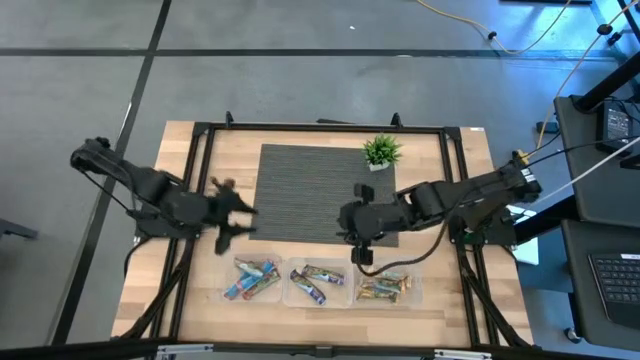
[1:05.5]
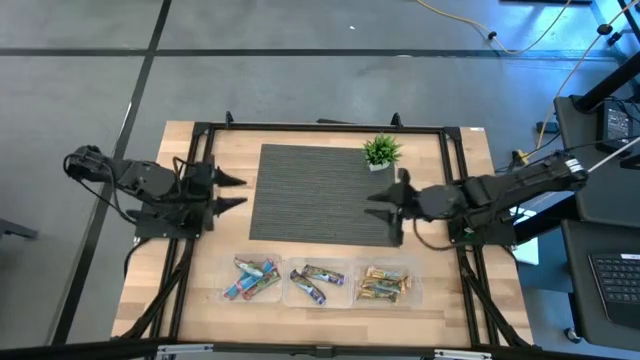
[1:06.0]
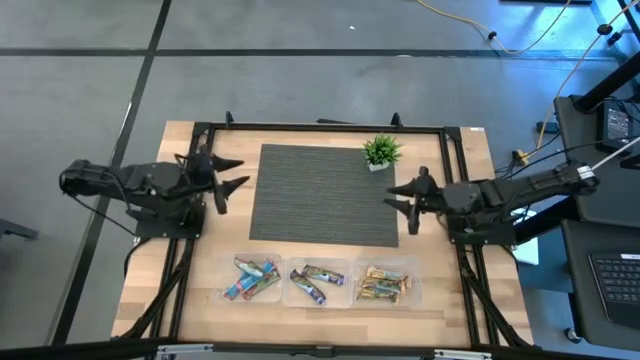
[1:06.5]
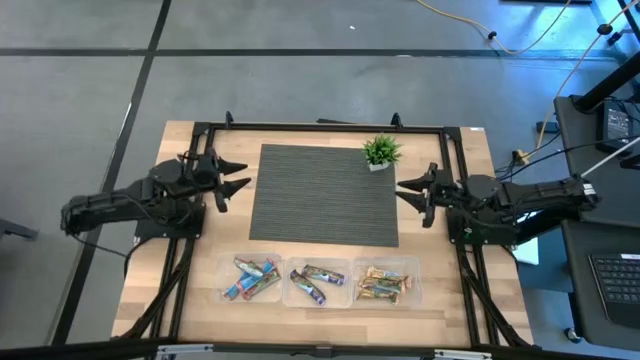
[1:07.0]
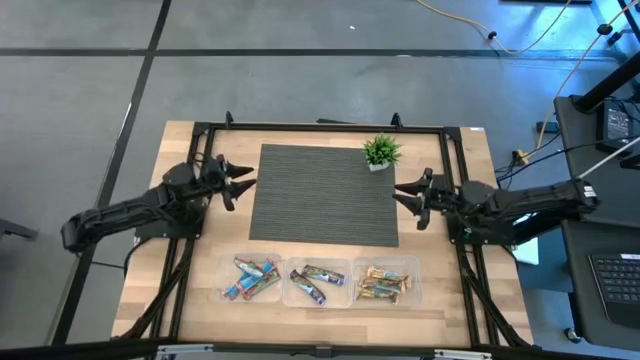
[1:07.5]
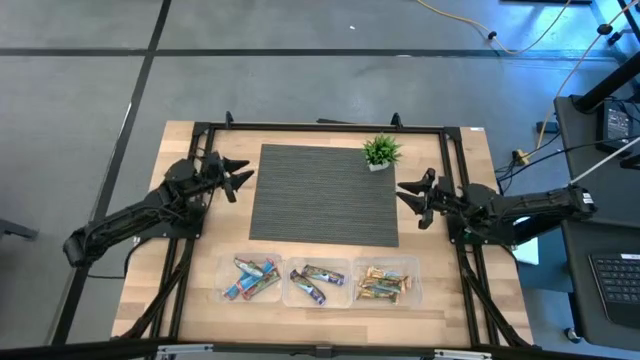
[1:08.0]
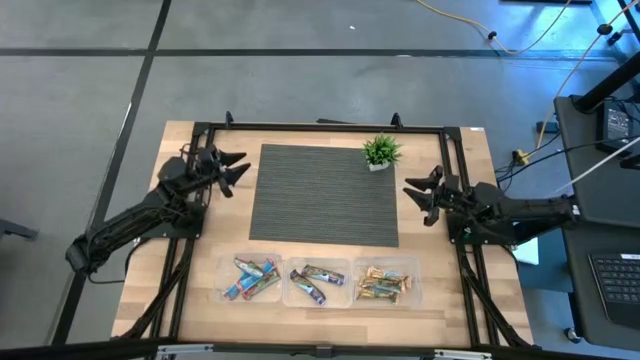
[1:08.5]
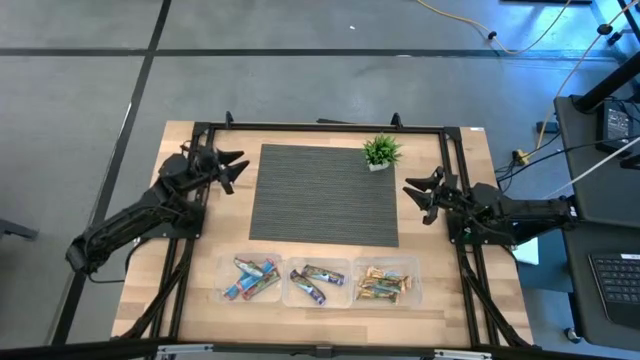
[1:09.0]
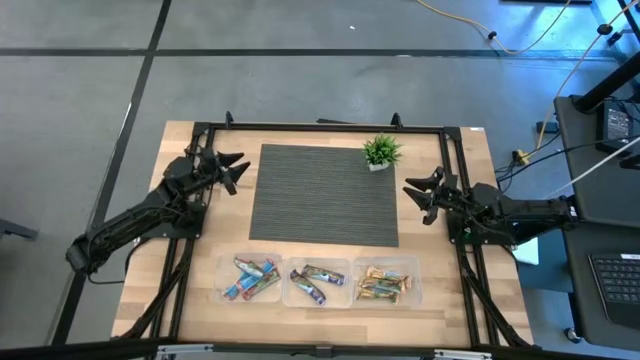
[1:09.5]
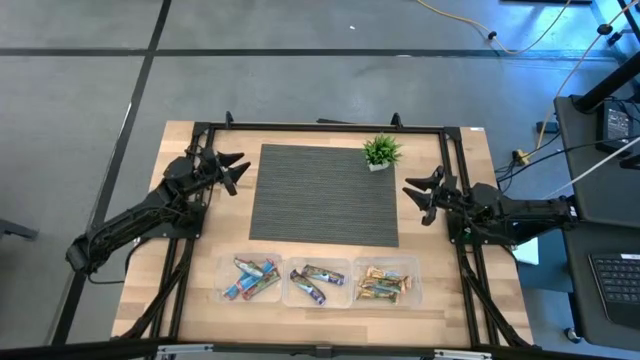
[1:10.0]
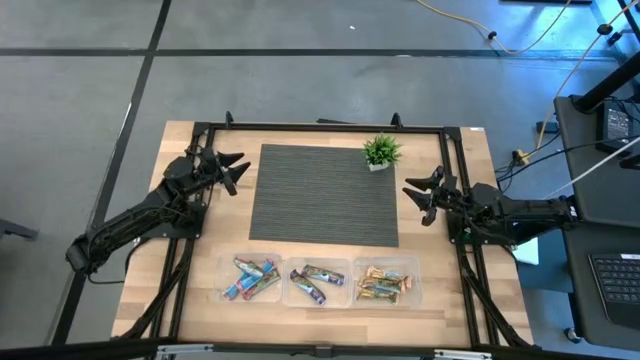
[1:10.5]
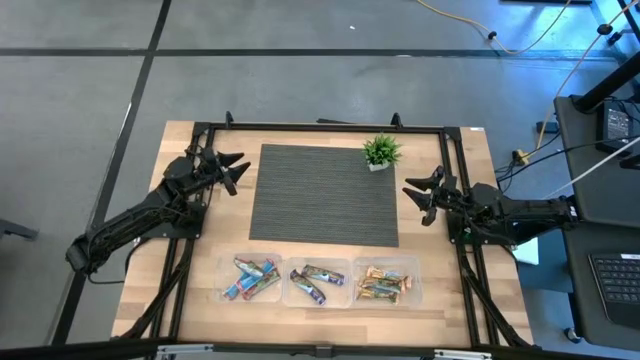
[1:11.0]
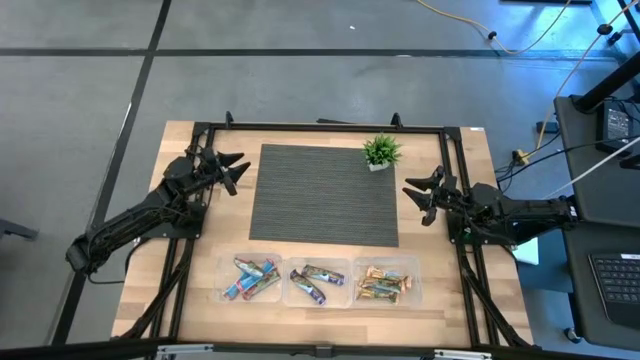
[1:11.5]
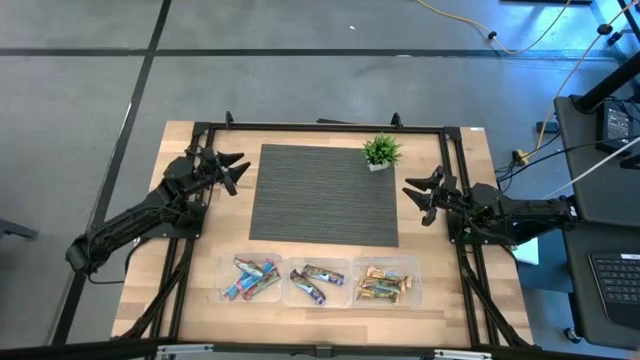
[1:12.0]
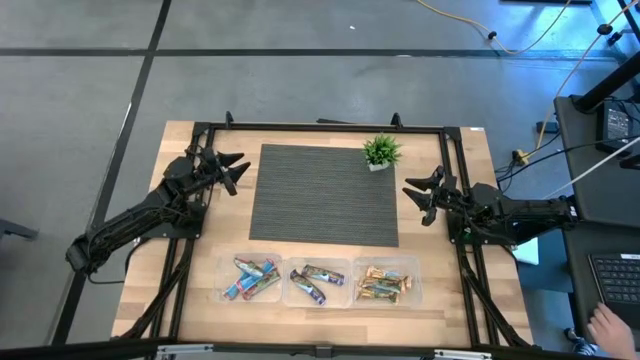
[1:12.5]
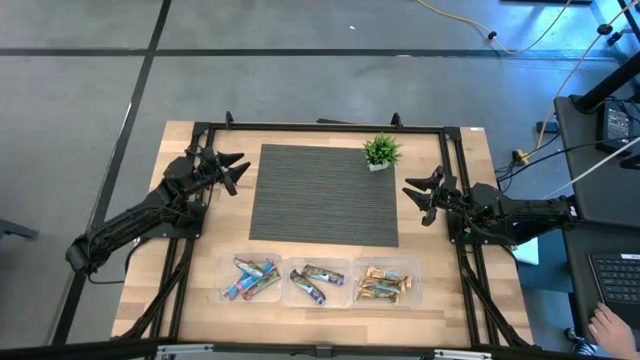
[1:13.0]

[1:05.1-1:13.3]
Task: Pick and place Granola Bars by type
Return to Home Position

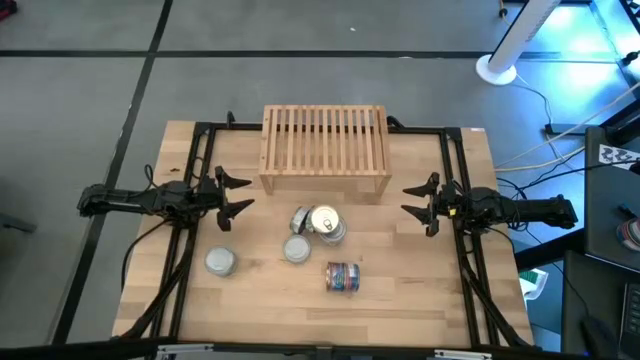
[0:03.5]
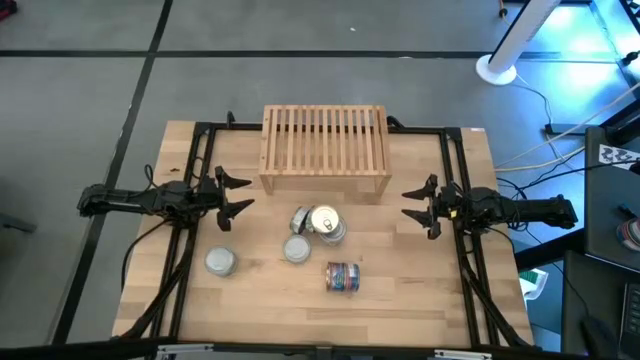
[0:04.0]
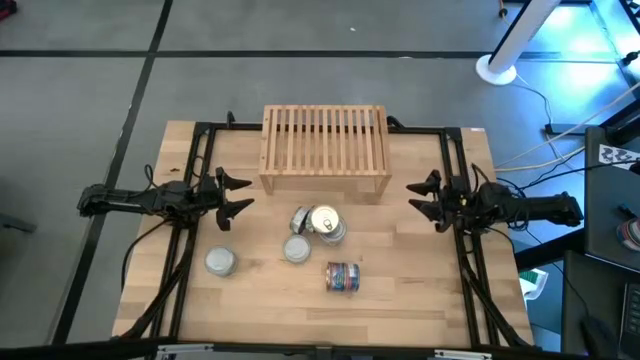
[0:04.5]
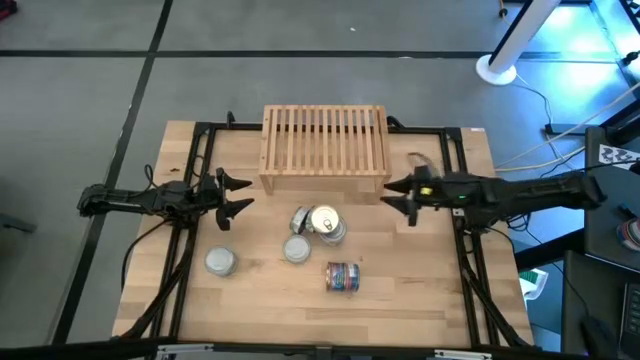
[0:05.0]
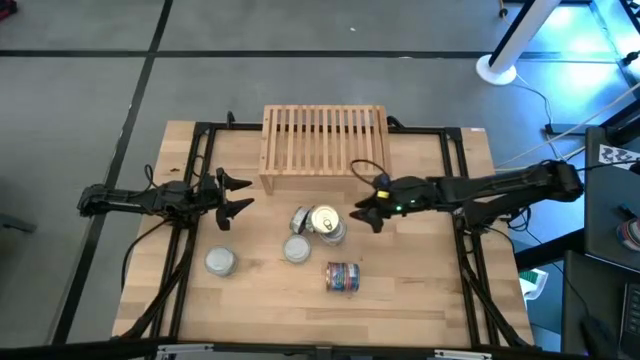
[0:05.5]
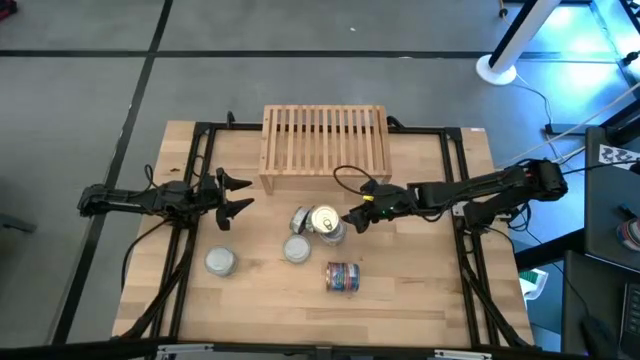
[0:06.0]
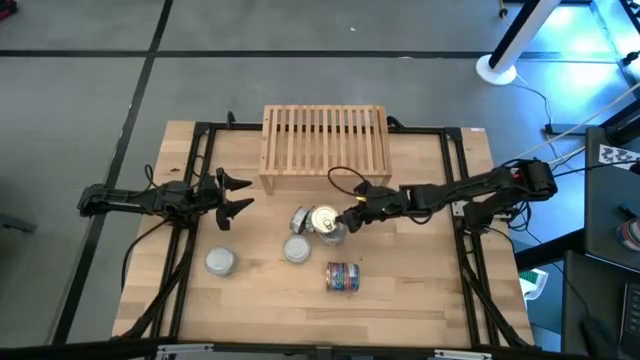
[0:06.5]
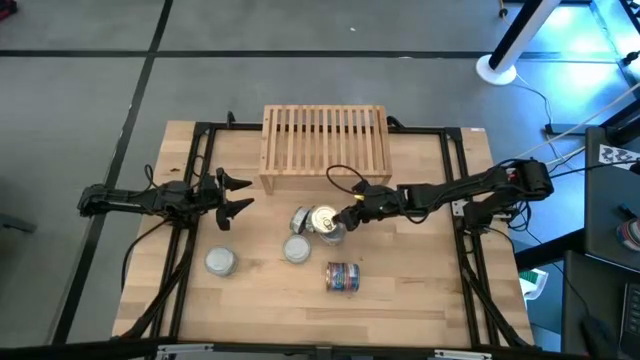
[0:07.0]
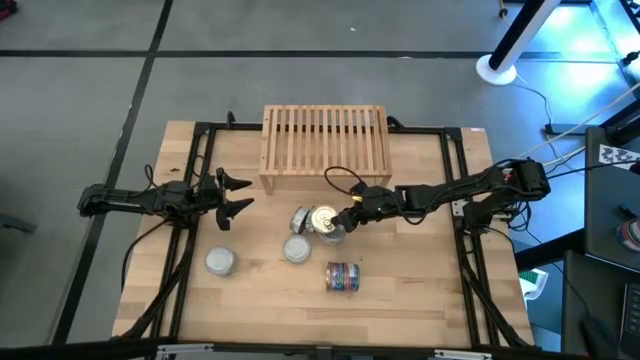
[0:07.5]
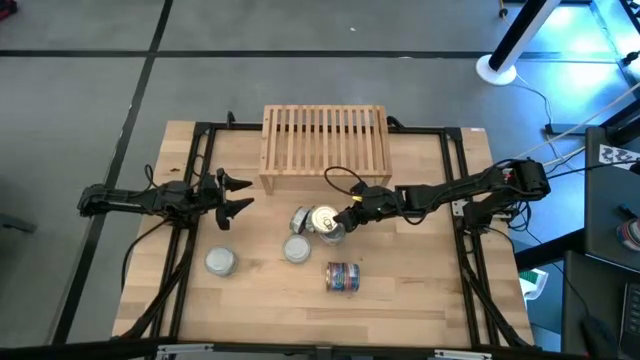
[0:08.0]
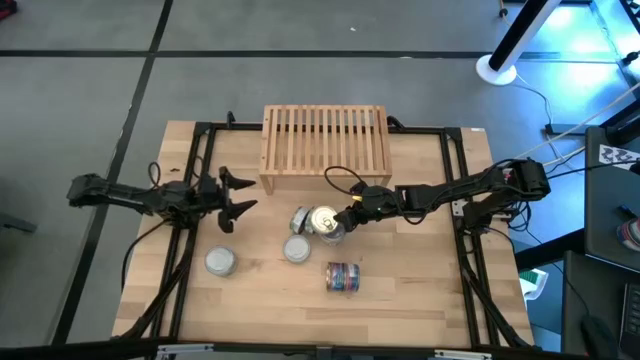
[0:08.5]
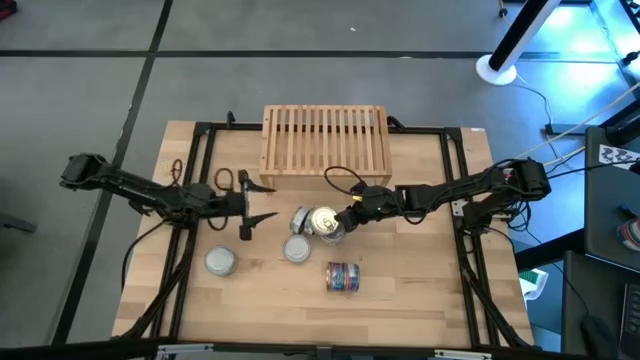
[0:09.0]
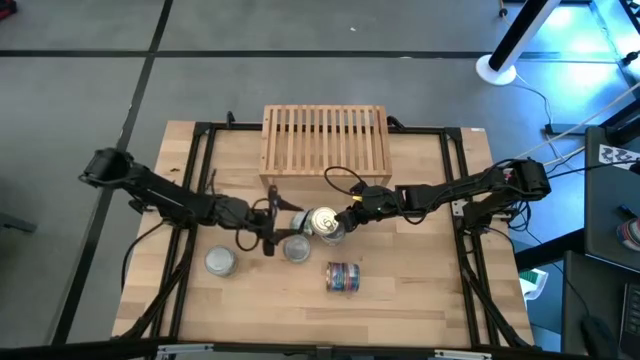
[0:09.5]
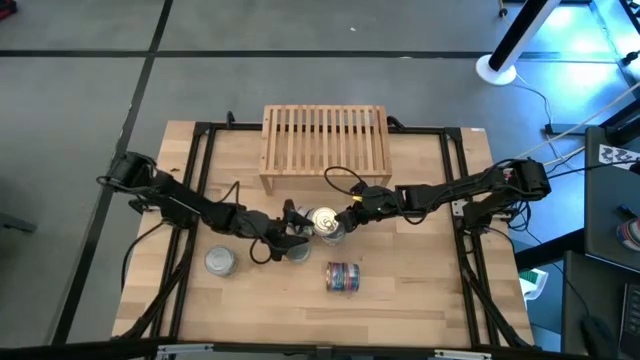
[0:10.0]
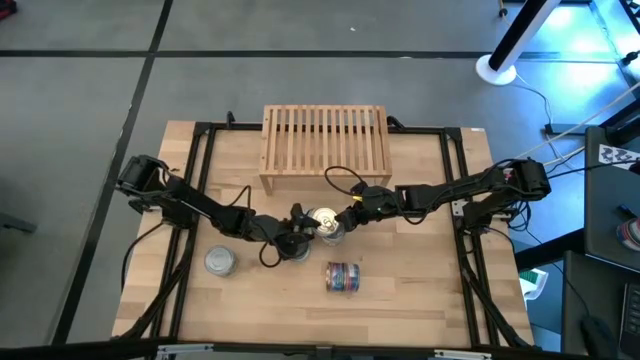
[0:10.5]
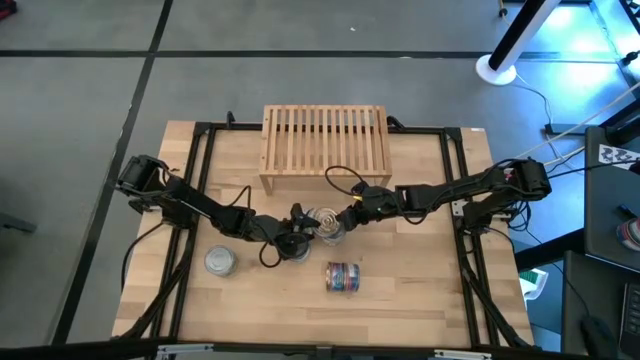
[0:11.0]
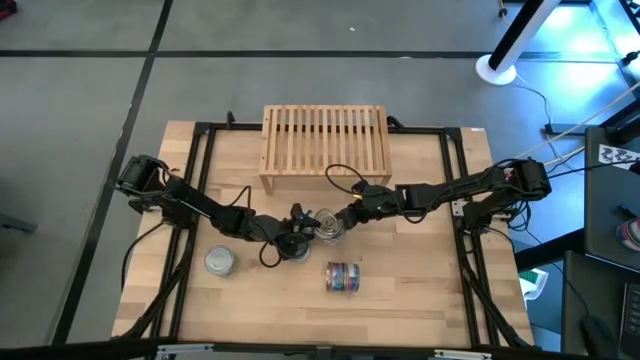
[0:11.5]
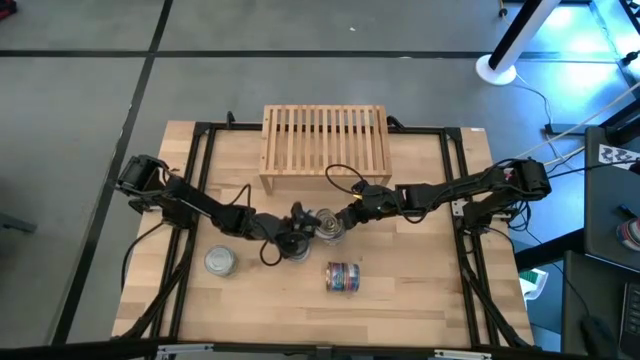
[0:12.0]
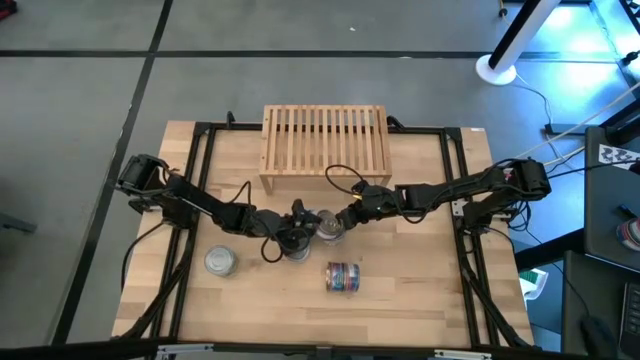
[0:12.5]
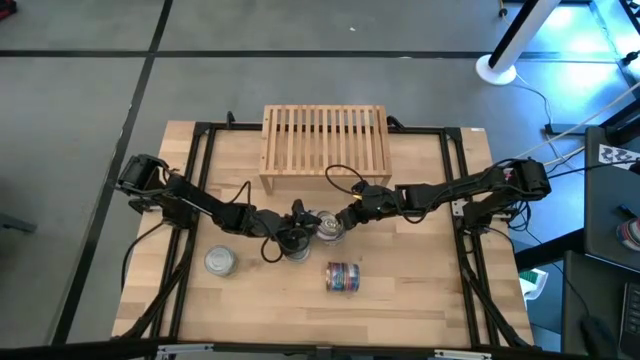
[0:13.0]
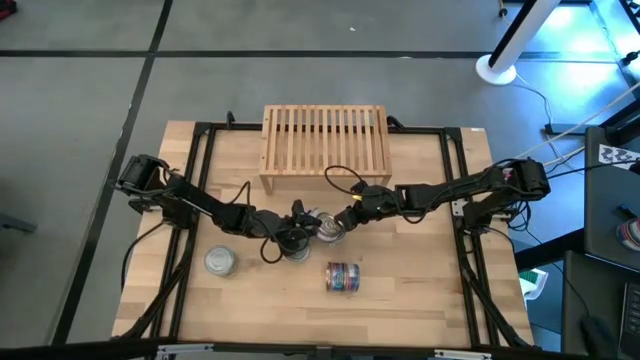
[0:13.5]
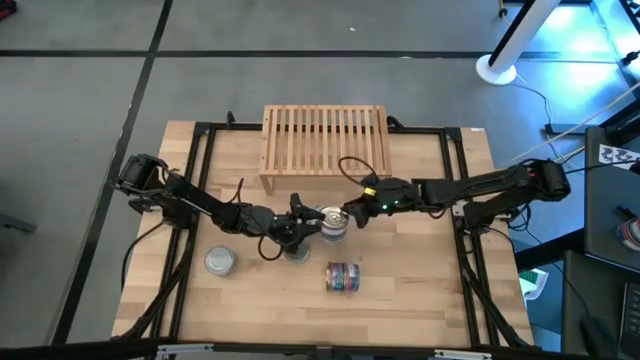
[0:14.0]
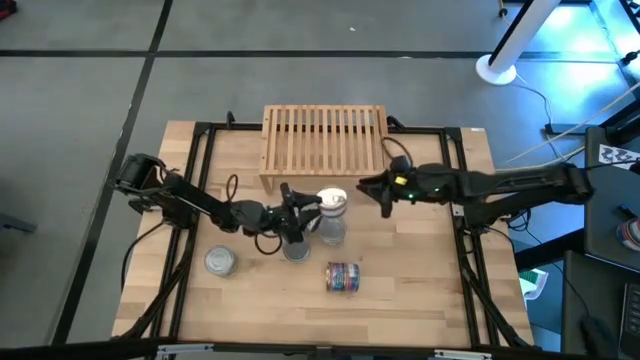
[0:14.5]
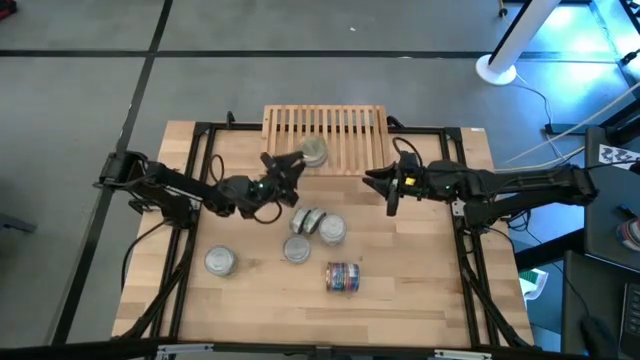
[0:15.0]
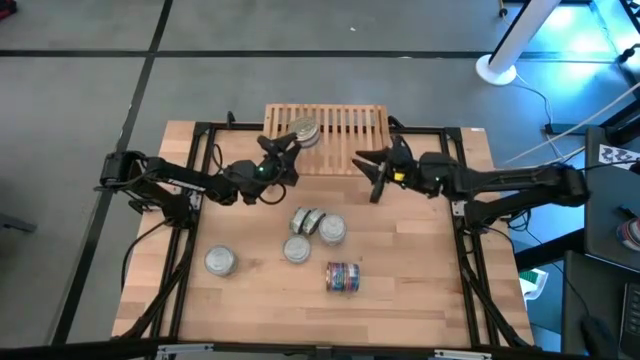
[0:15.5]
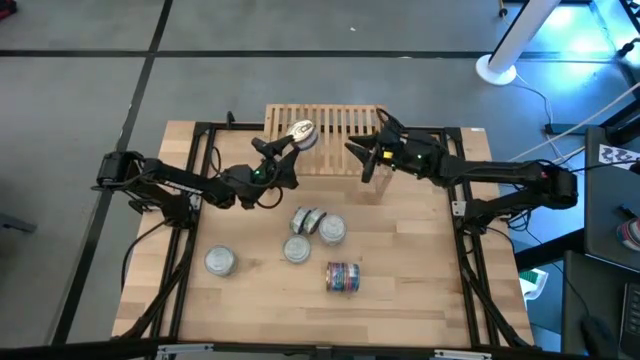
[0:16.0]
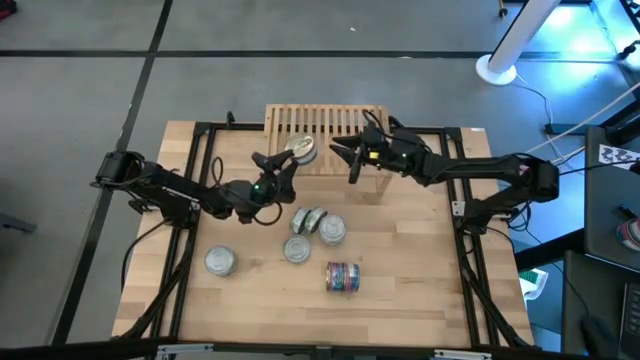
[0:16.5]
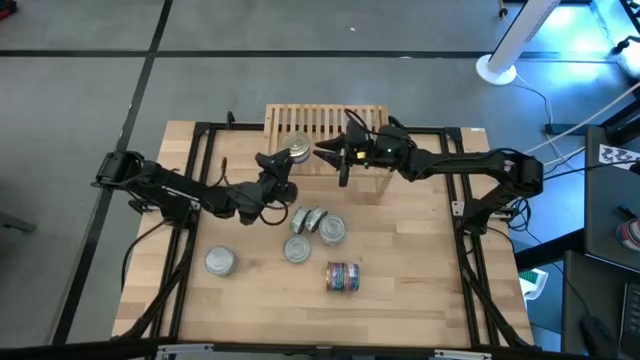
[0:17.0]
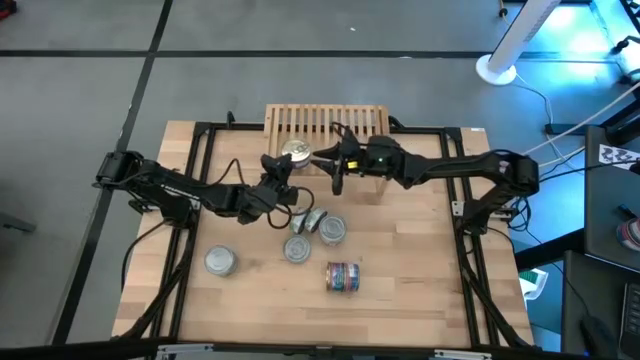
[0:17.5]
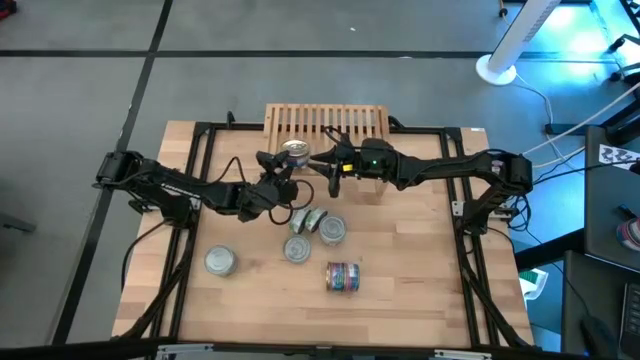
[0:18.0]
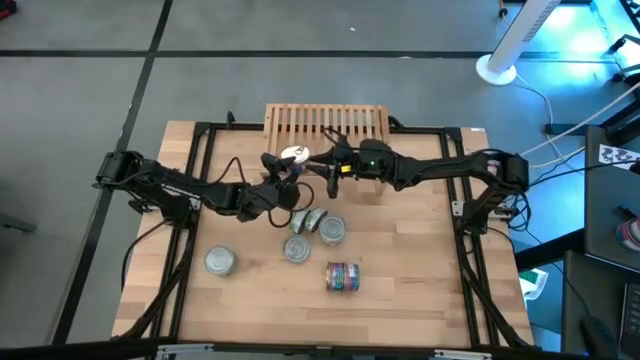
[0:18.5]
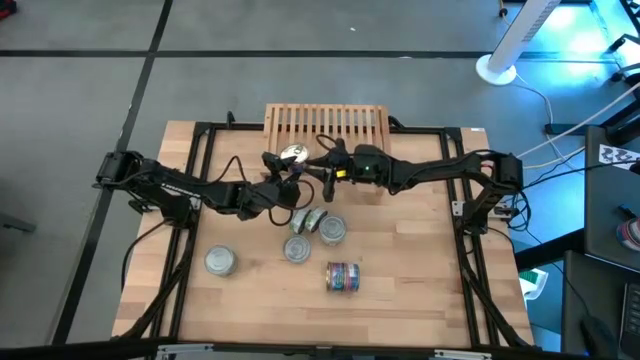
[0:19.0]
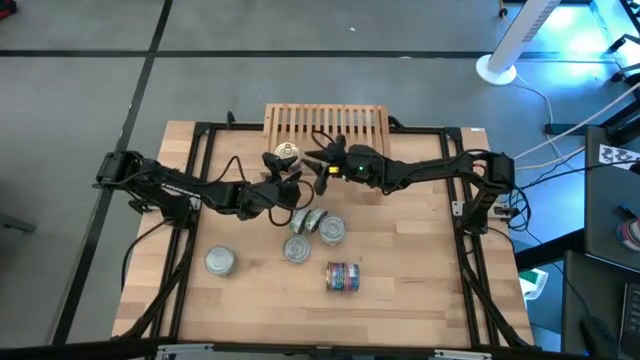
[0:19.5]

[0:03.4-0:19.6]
Task: Stack canned seafood by type on shelf
Put the blue-pink tuna can on the shelf
